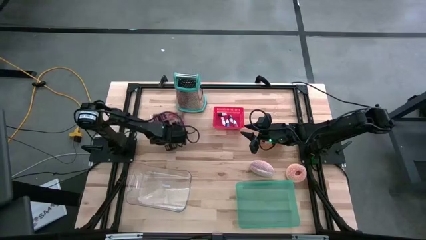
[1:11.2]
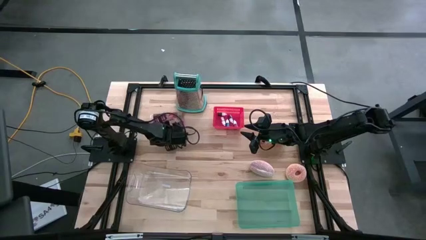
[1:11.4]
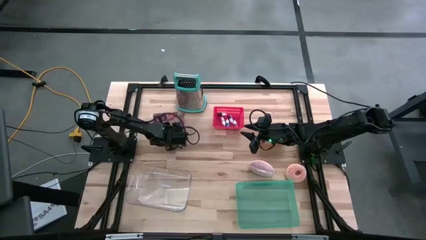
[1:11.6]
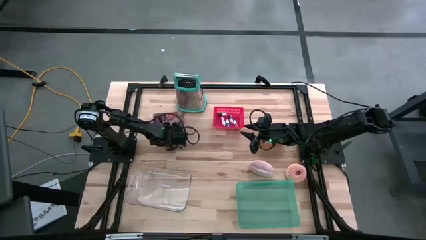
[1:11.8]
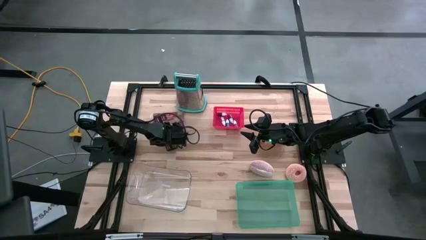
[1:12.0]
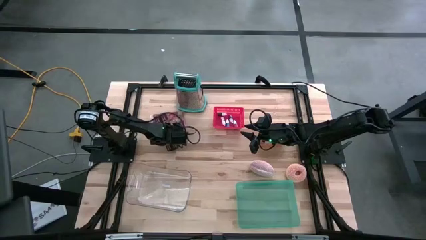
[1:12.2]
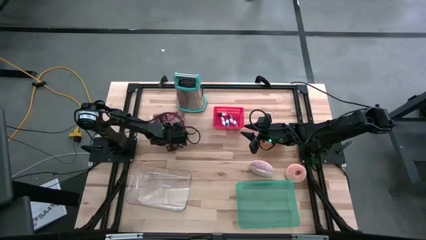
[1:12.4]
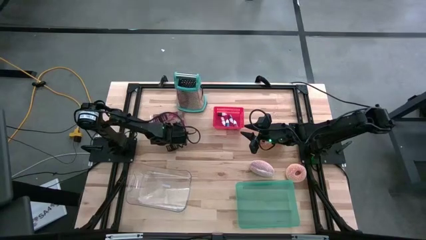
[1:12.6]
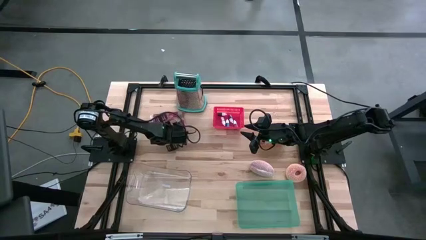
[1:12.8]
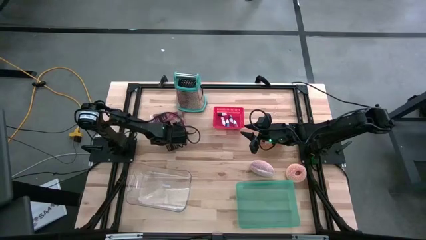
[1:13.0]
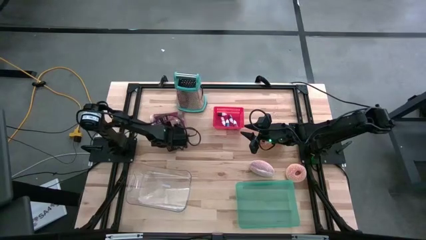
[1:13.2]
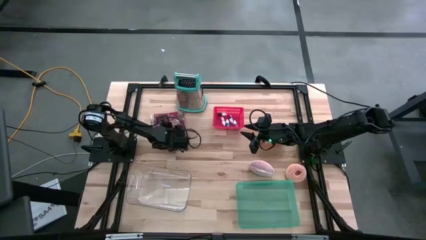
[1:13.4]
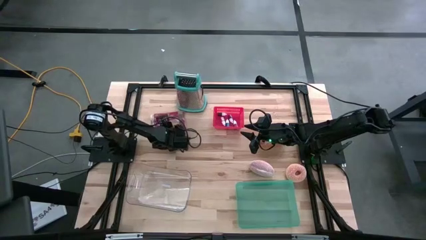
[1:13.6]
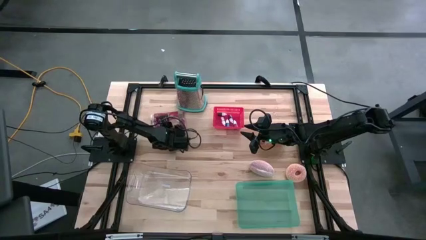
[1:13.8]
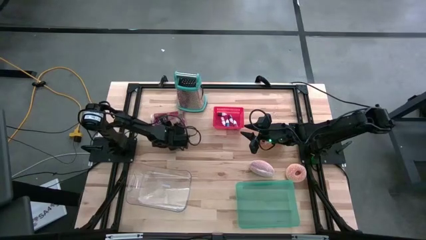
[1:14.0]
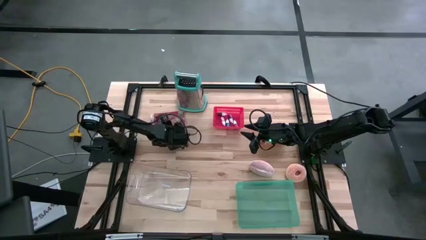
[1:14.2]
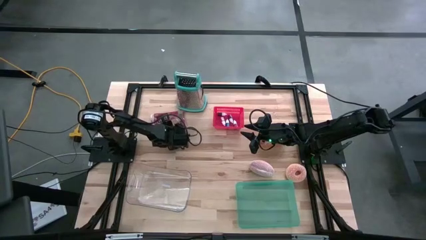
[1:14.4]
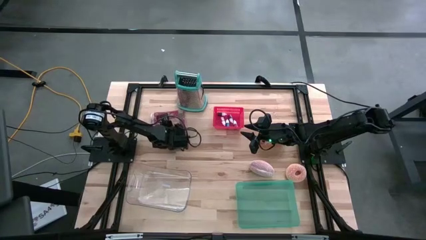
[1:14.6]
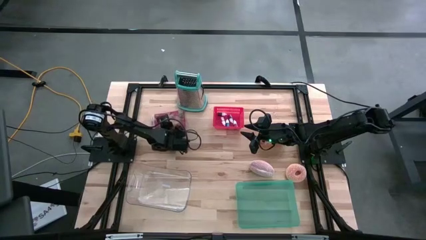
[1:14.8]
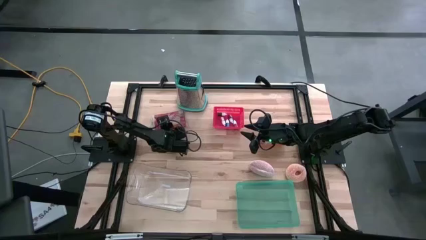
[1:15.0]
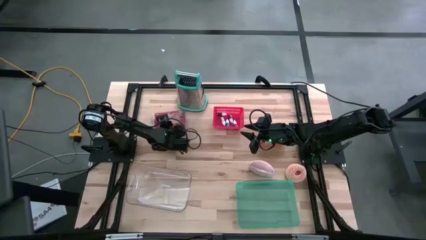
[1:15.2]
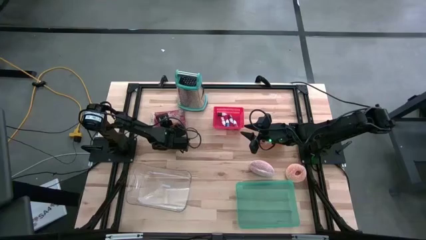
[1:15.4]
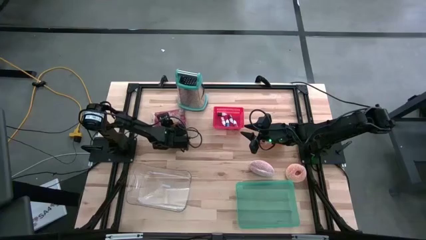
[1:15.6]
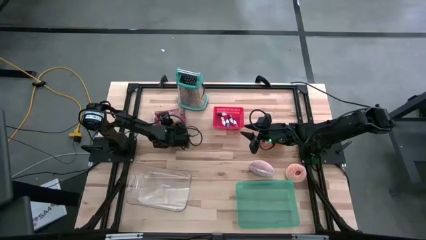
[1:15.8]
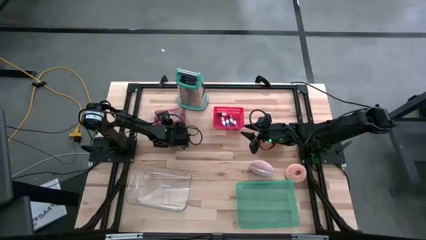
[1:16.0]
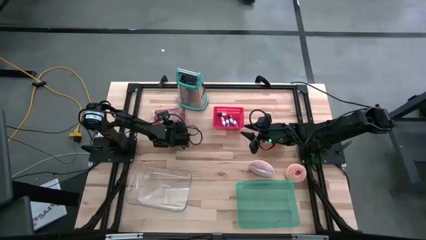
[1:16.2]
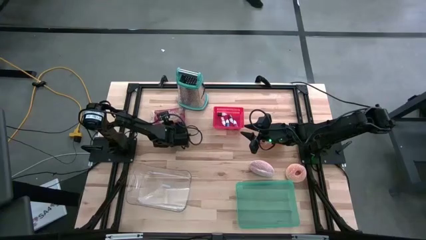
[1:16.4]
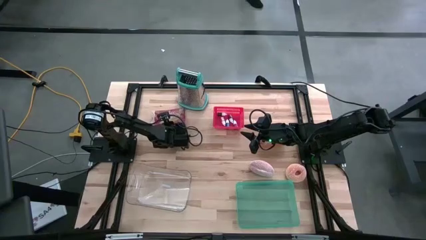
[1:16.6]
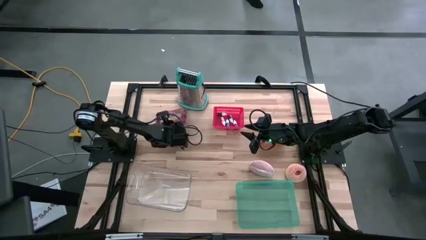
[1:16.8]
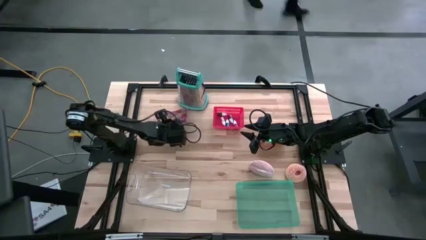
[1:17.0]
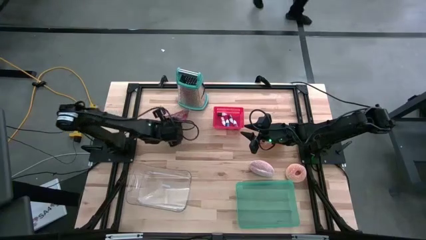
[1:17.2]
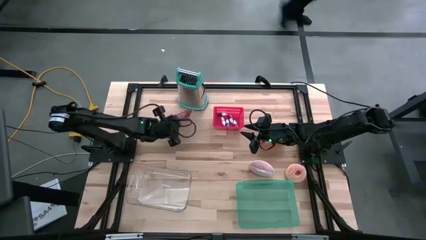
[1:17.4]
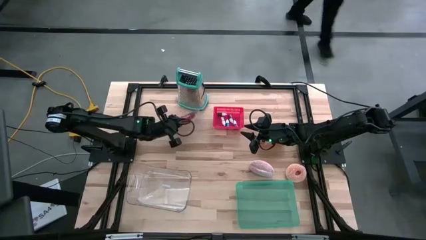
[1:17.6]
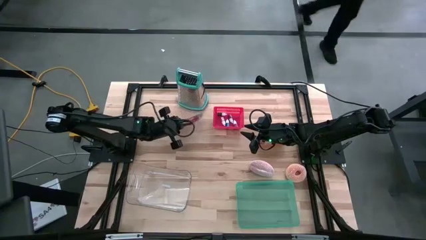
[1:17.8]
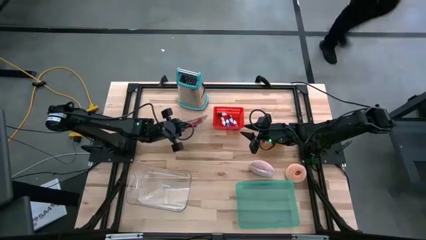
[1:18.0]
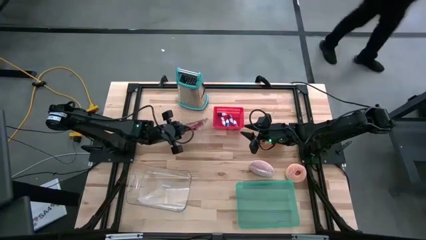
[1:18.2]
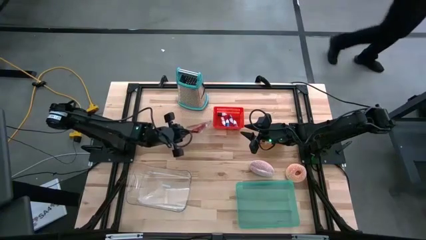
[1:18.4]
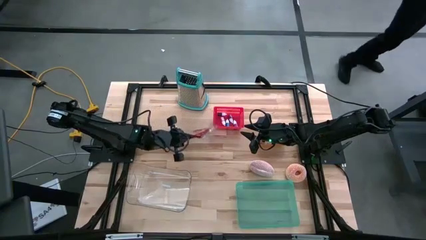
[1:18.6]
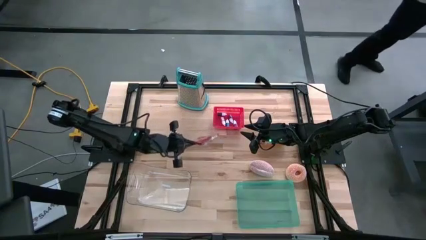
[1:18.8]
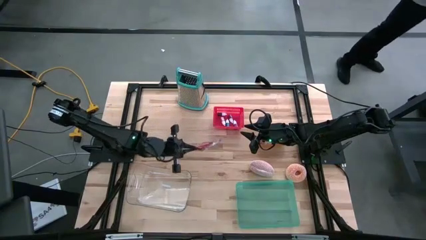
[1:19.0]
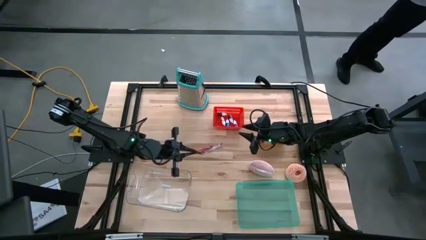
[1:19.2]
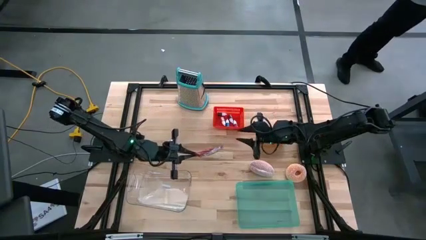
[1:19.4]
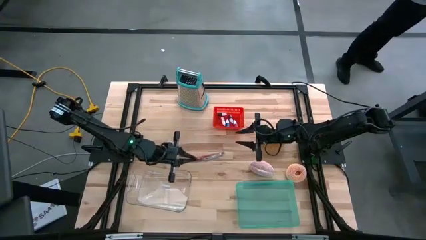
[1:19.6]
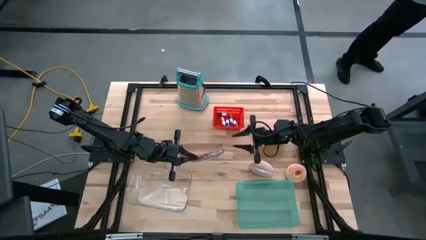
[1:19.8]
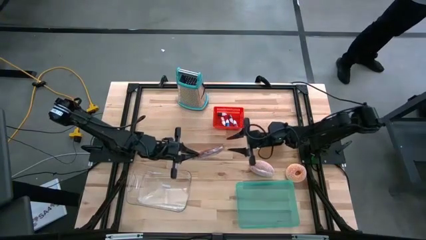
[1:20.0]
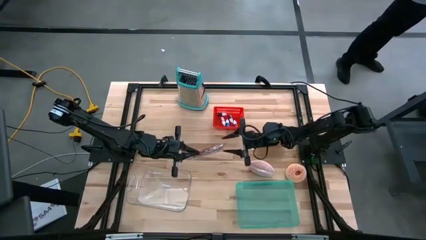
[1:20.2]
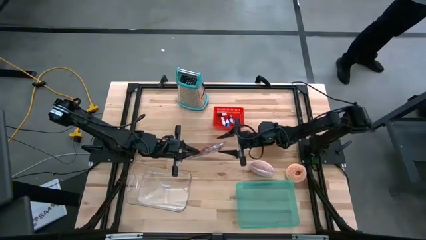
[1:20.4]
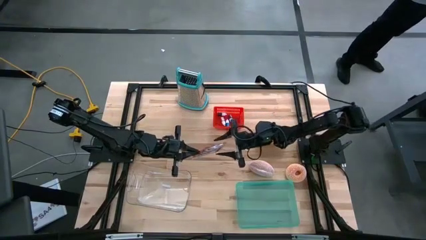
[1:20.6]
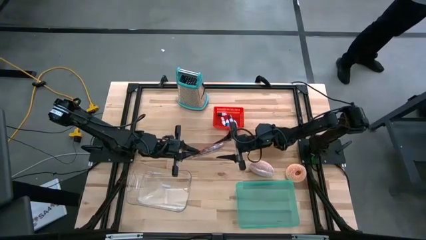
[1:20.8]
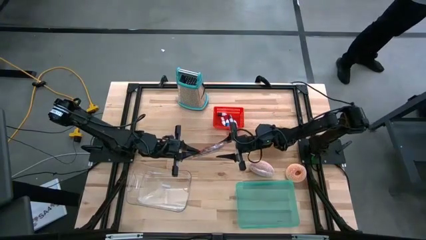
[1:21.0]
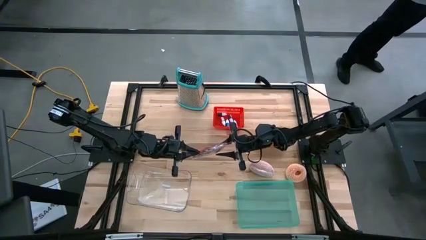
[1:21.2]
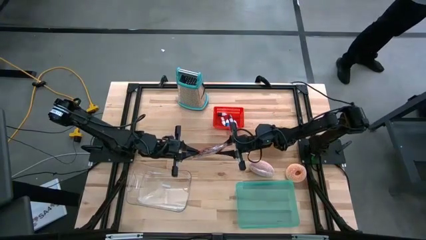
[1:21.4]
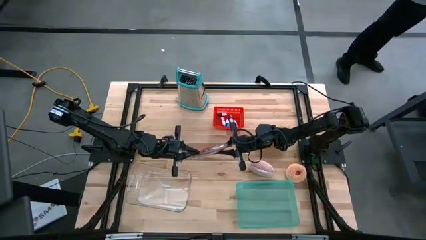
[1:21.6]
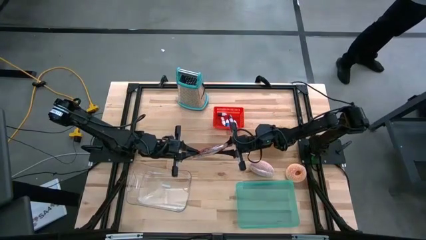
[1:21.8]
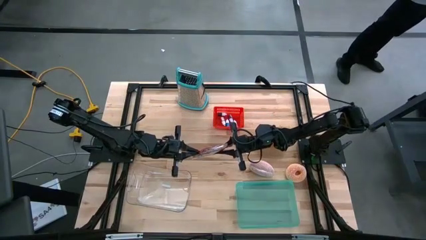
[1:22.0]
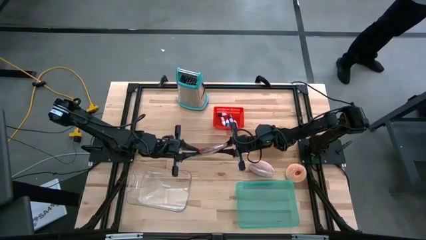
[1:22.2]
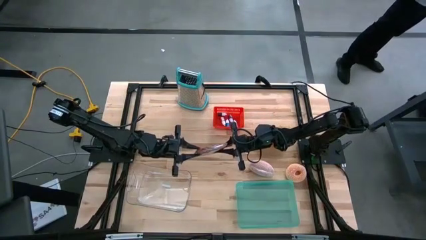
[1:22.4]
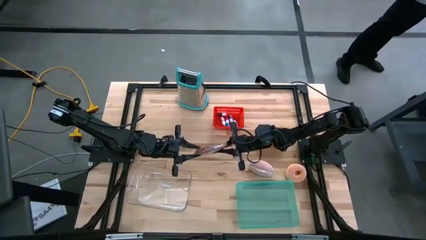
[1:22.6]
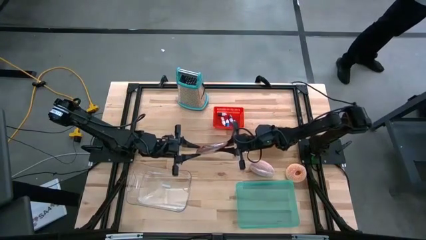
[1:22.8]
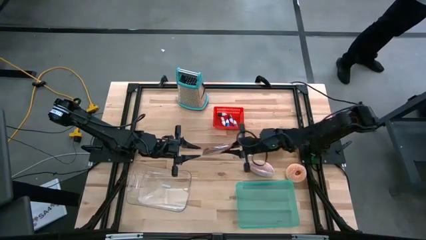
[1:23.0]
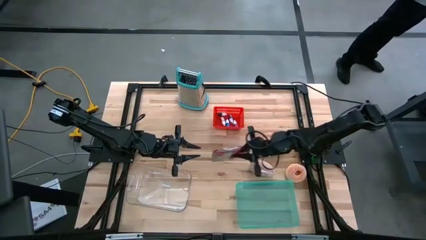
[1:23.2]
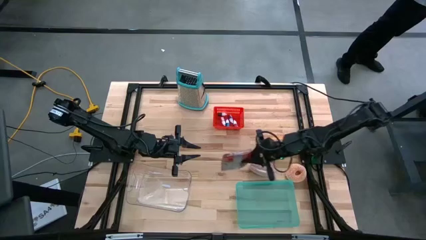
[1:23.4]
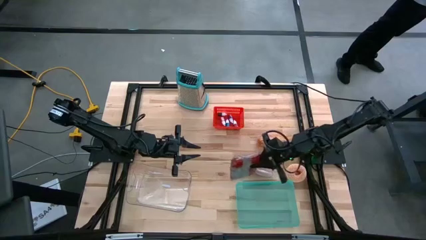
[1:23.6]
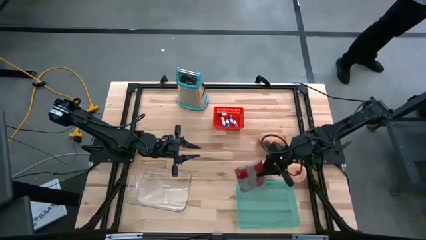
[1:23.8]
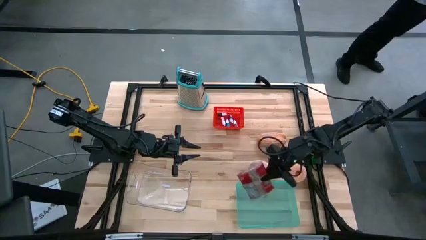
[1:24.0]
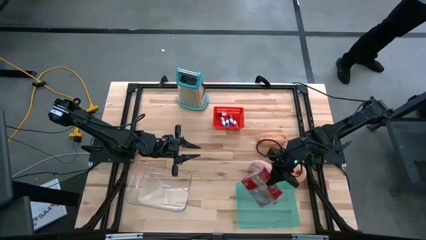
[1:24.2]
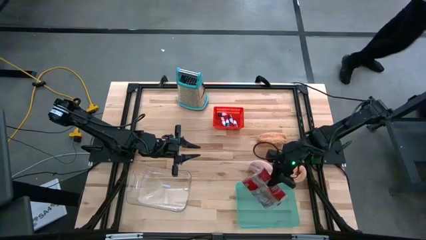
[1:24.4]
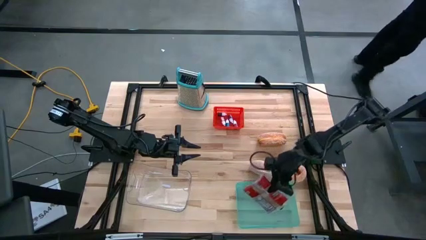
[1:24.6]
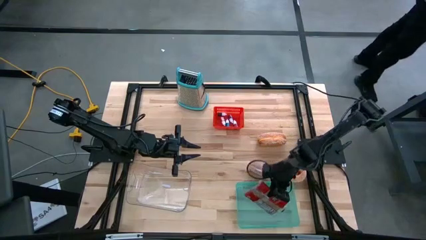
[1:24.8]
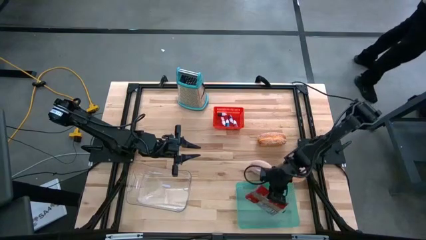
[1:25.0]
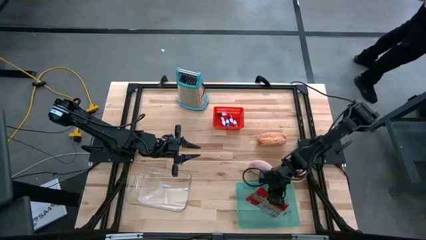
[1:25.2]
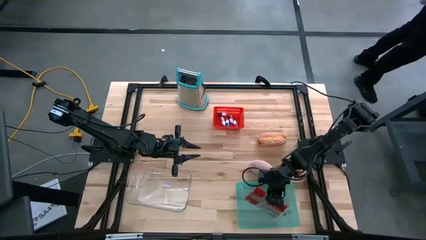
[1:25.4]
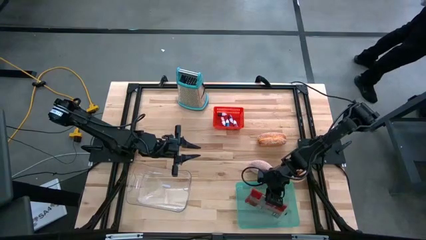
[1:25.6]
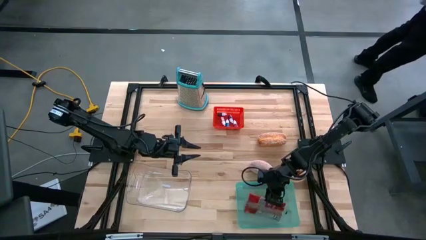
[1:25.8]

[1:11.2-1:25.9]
Put the popcorn bag into the green bin
